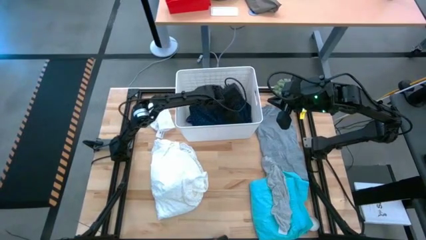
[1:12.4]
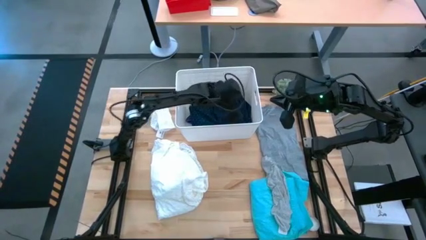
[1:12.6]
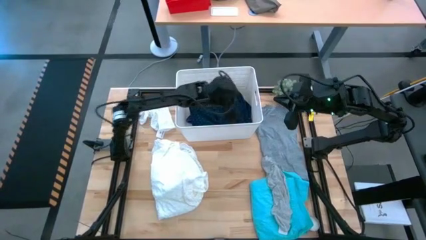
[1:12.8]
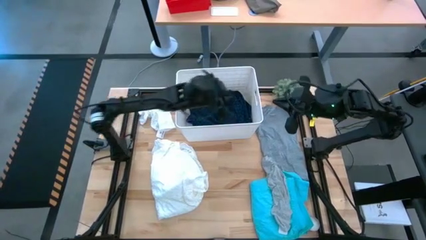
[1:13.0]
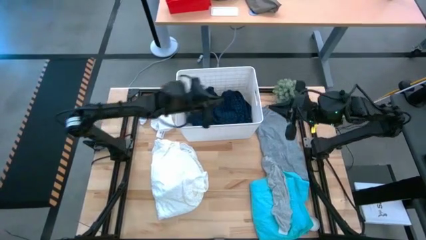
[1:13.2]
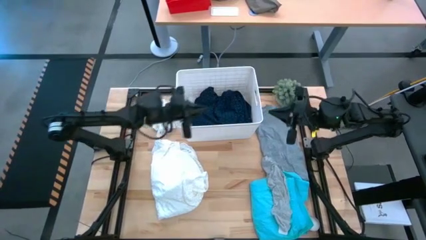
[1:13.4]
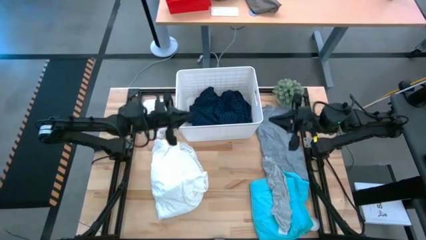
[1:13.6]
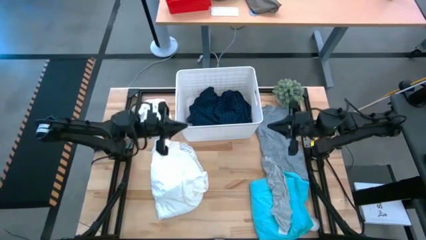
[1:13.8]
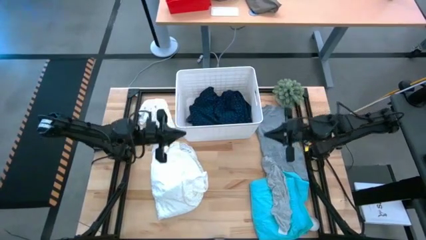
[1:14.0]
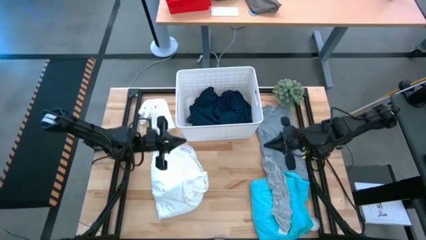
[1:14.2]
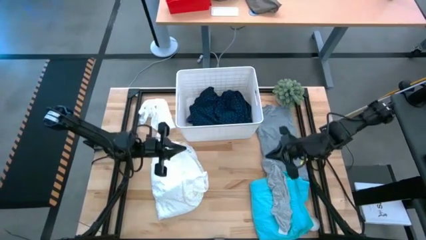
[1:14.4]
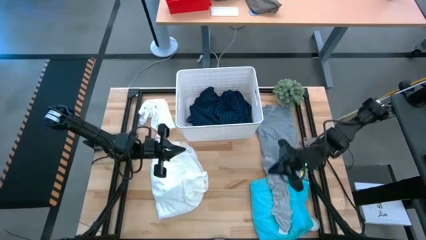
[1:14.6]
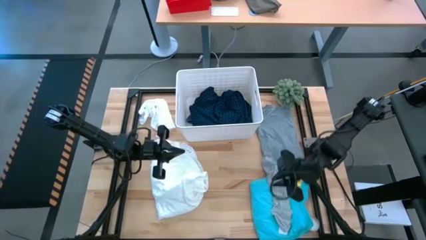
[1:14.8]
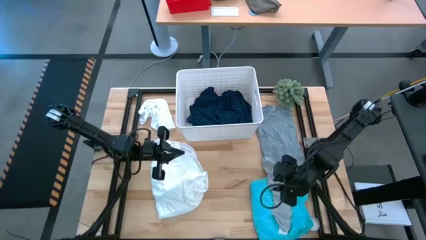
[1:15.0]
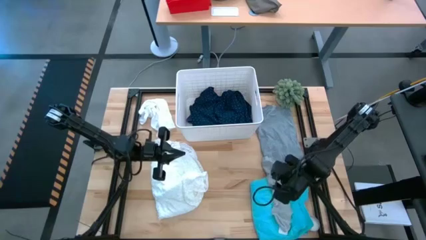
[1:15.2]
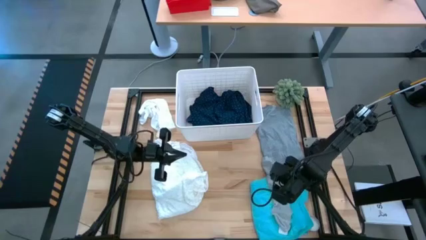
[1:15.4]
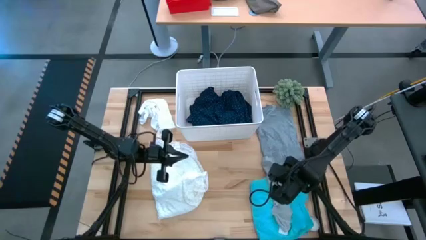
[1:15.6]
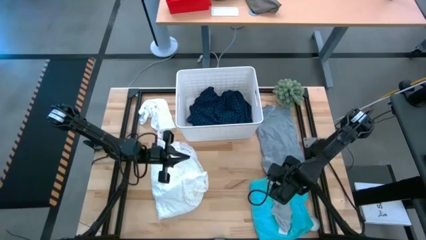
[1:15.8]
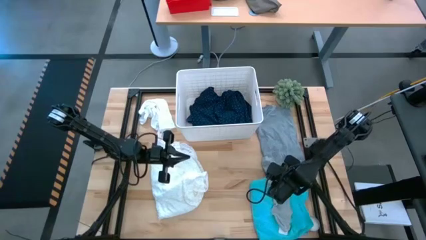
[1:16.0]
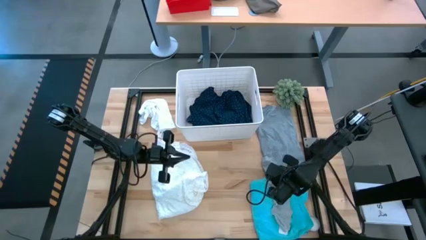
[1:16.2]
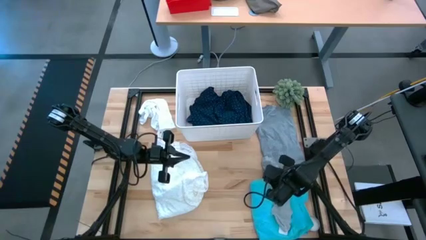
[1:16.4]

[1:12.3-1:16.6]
Task: Sort clothes
Put the gray sock into the white laundry bin

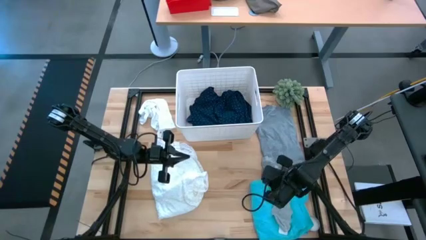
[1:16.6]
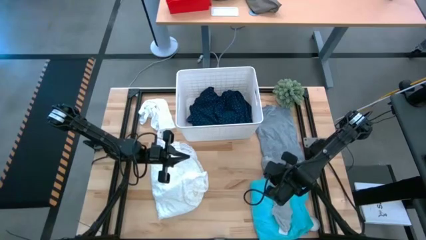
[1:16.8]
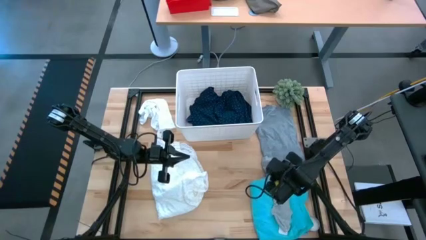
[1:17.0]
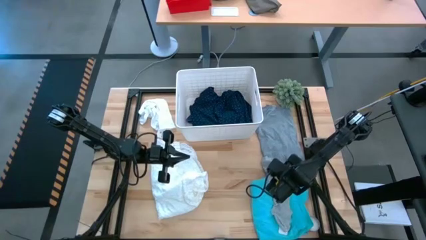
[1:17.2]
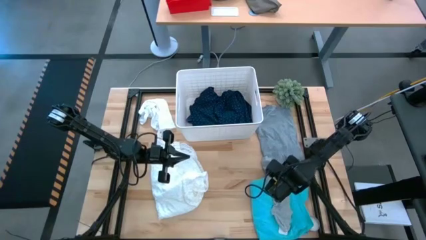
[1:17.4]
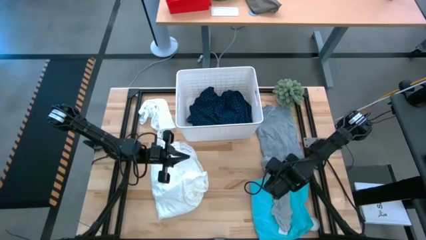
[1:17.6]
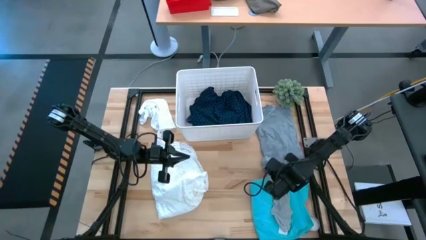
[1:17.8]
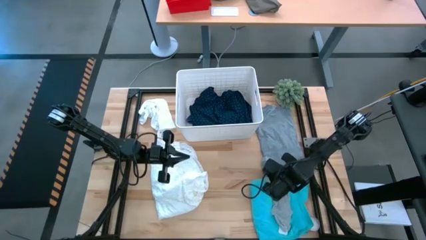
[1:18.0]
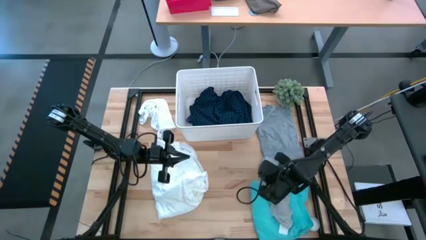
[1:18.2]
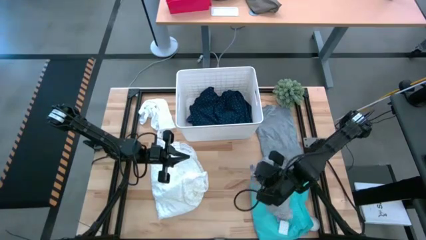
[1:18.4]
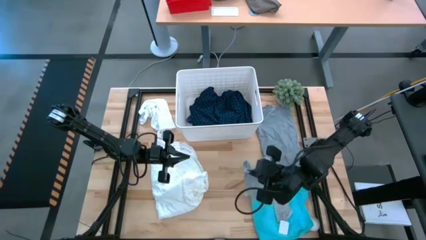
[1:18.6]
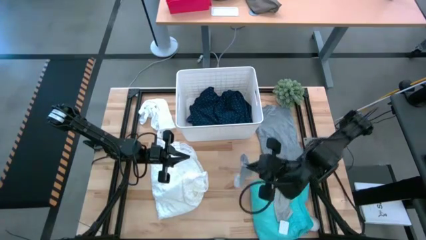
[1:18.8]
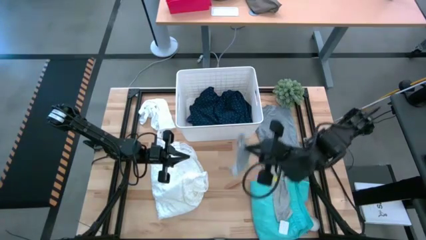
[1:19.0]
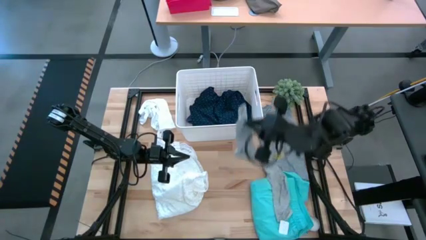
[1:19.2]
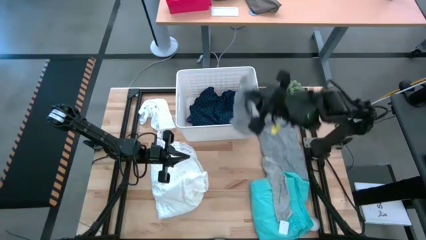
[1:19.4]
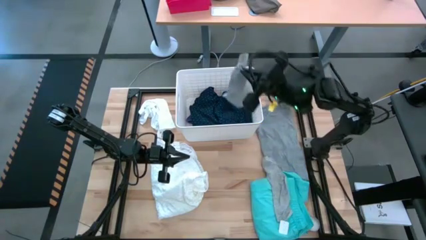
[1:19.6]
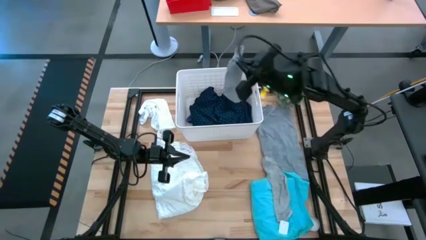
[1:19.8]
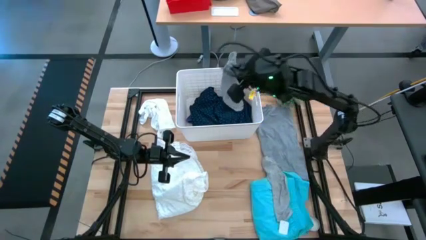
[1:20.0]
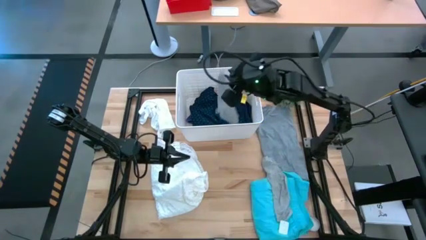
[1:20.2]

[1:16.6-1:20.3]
Put the gray sock into the white laundry bin

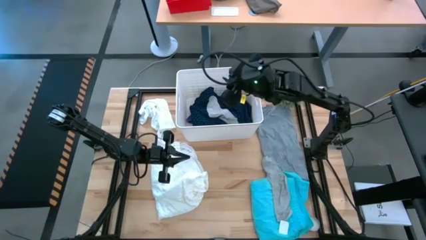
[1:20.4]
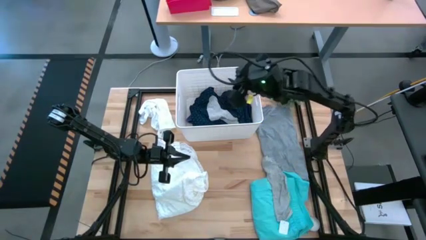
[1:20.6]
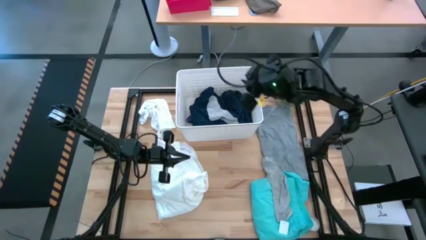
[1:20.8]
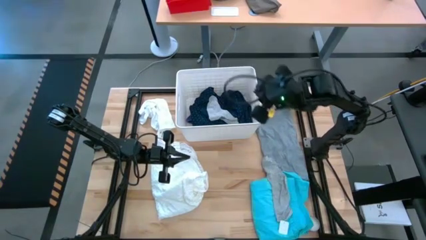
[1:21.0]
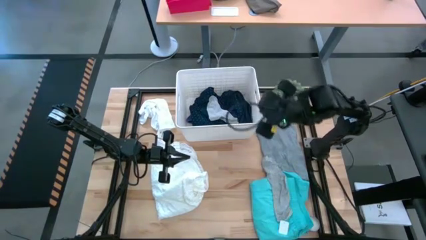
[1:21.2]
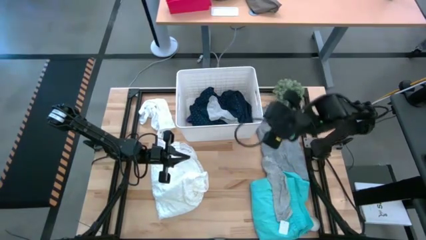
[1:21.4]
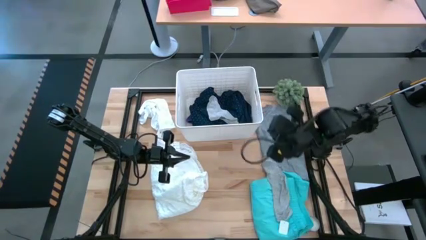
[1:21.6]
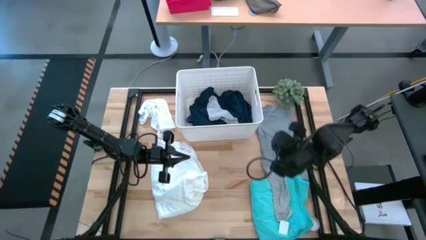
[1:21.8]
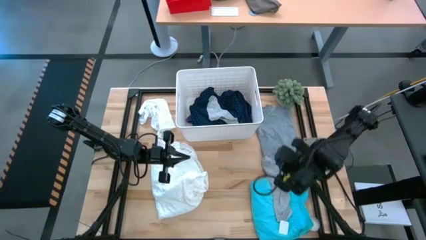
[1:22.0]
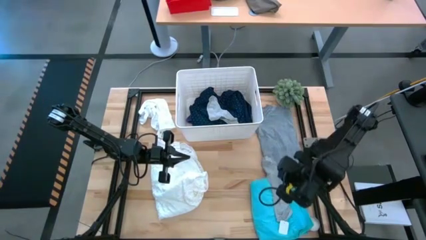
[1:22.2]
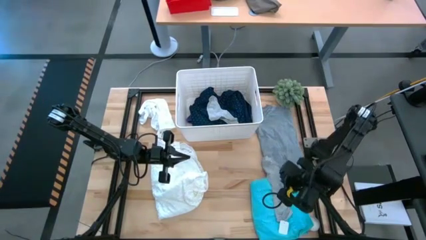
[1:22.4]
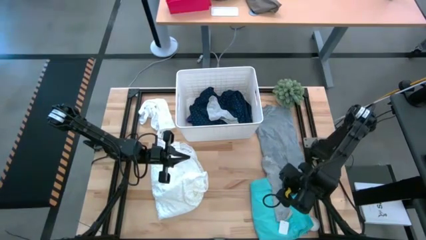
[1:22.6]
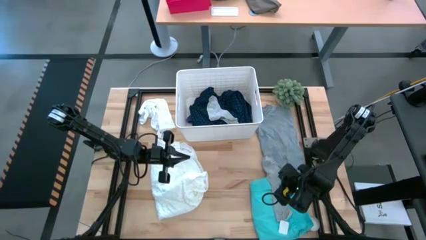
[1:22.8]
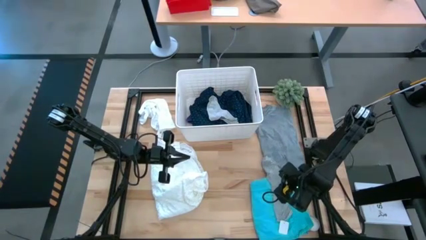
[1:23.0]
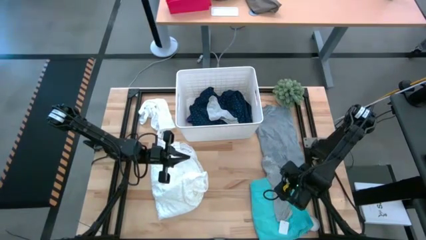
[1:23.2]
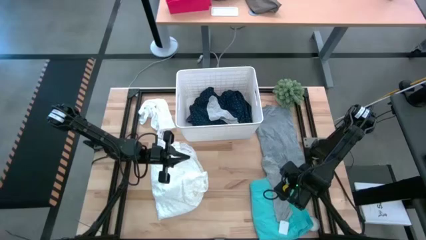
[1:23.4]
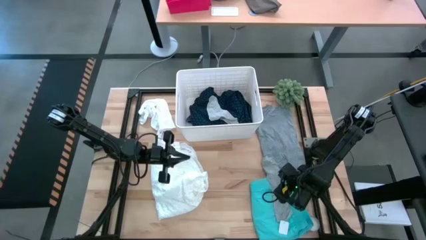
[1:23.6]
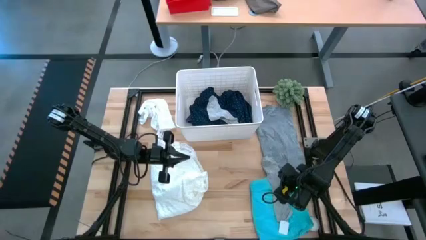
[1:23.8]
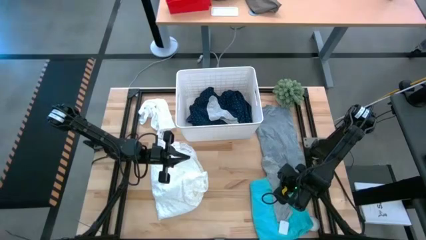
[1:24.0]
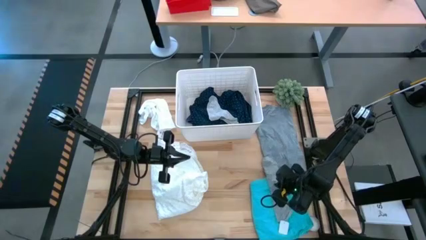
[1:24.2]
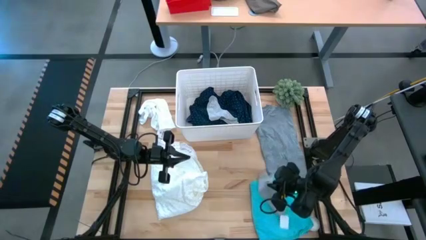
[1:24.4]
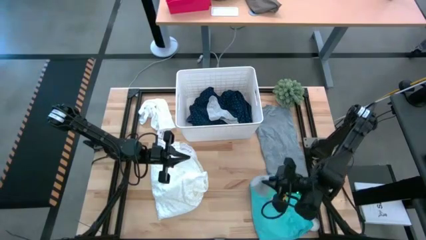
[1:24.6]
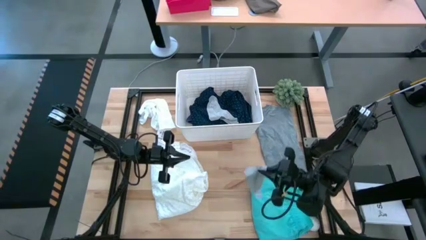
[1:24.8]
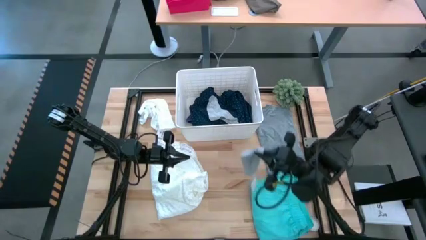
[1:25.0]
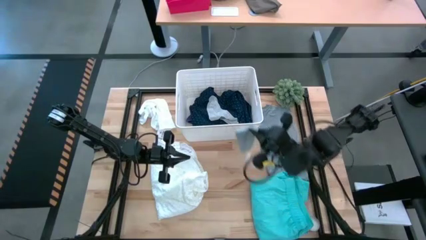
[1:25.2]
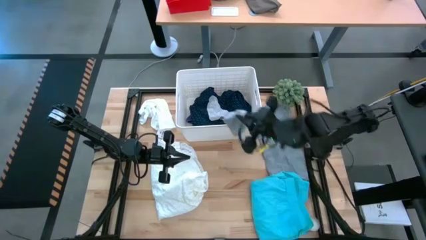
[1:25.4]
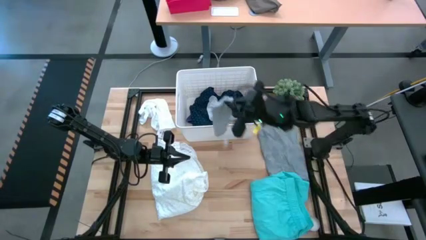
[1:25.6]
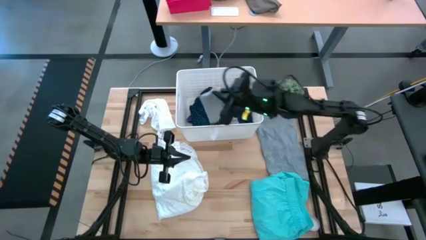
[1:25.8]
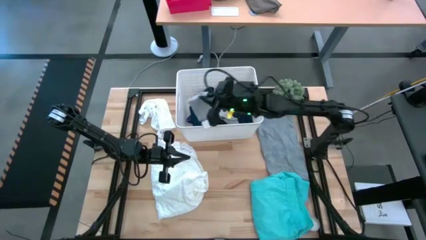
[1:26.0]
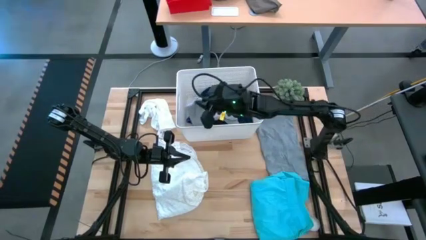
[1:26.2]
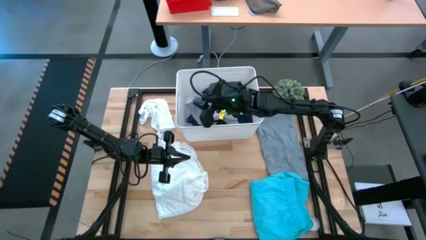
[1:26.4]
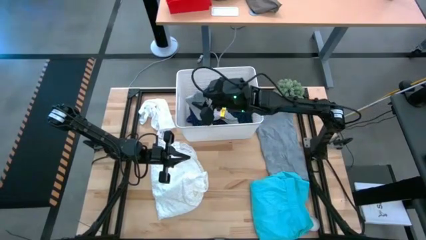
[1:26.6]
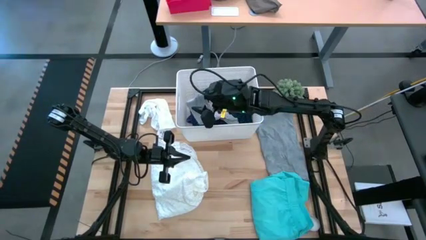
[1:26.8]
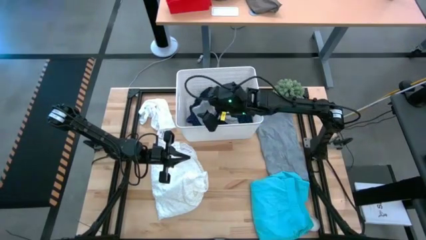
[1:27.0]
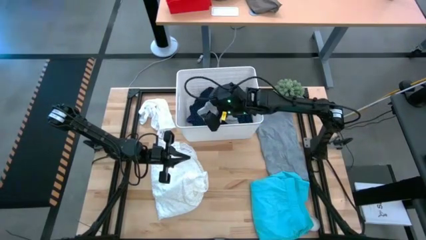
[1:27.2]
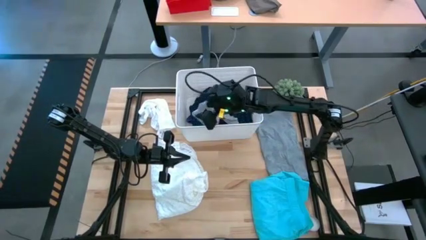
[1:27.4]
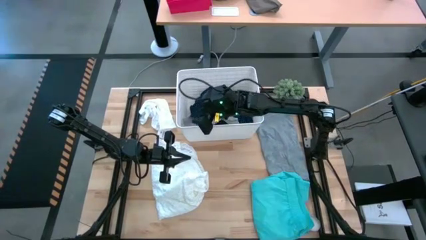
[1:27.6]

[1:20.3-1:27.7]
Put the gray sock into the white laundry bin

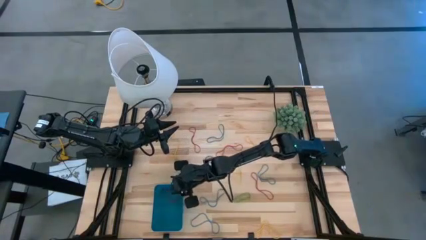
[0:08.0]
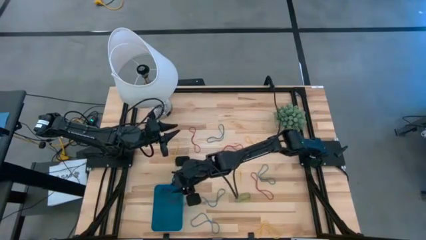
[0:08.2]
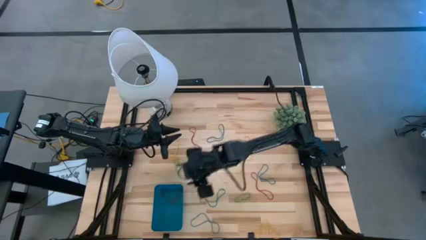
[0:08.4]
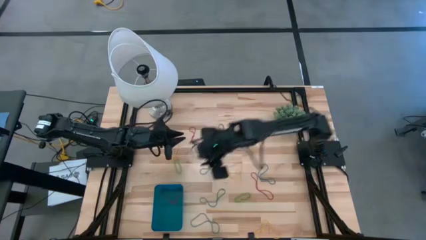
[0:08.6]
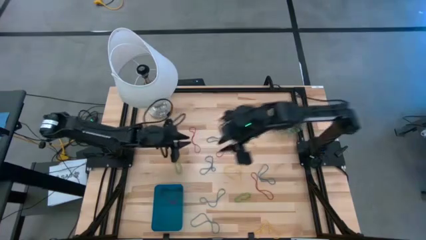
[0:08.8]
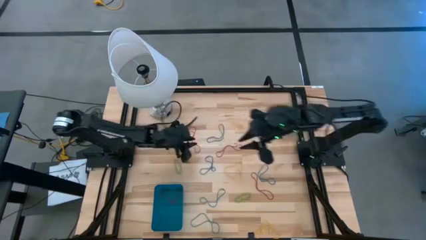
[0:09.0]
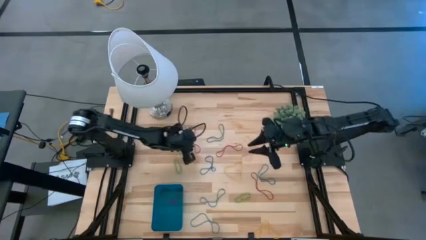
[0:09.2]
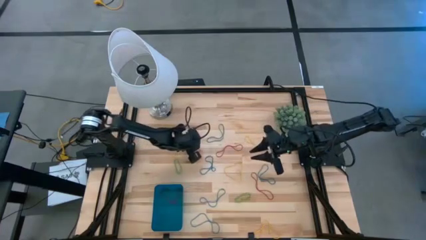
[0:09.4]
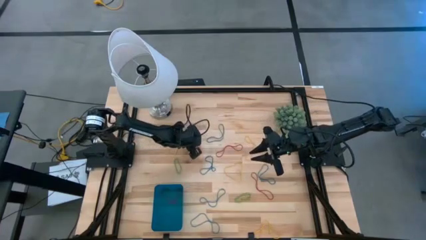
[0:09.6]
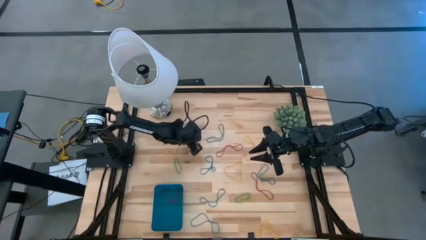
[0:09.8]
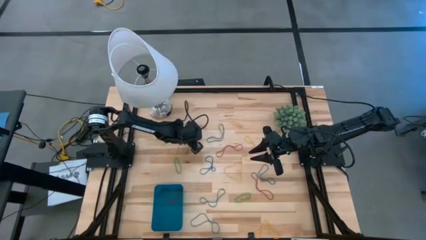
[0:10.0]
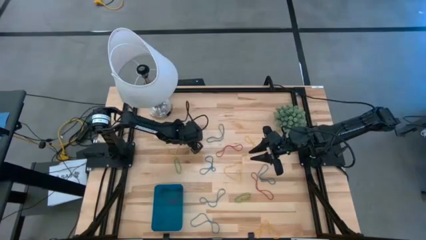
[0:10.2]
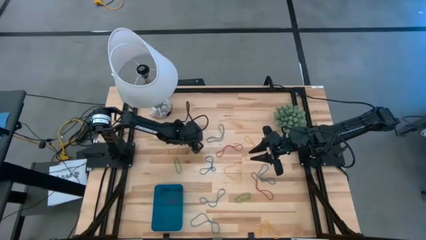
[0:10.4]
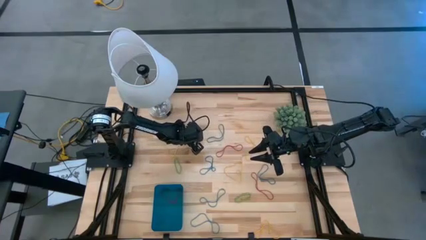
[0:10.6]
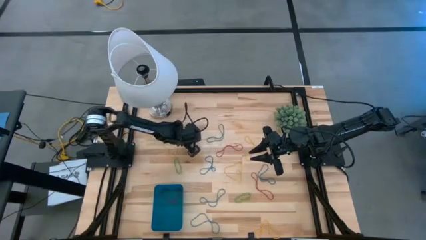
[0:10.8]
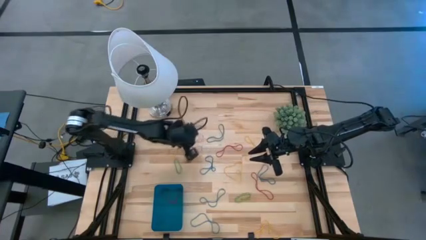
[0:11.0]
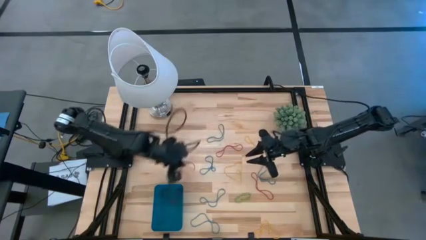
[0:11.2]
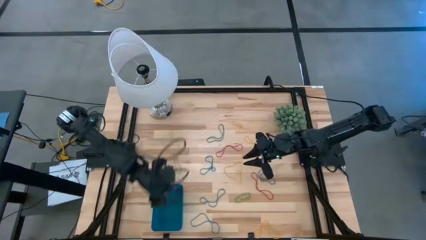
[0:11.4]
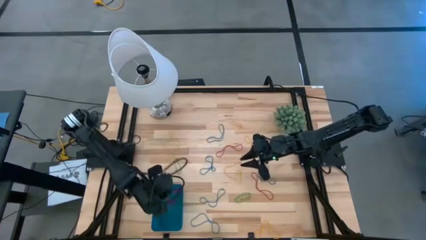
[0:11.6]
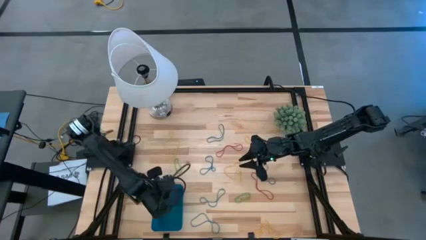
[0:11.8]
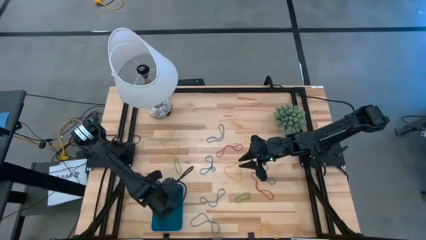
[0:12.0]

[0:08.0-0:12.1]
Task: Pick and place items into bin
Put the top red rubber band into the blue bin
